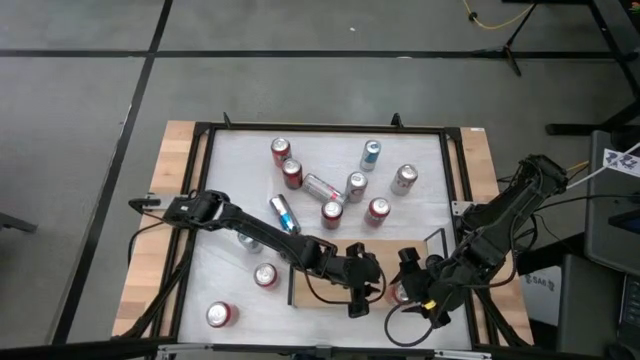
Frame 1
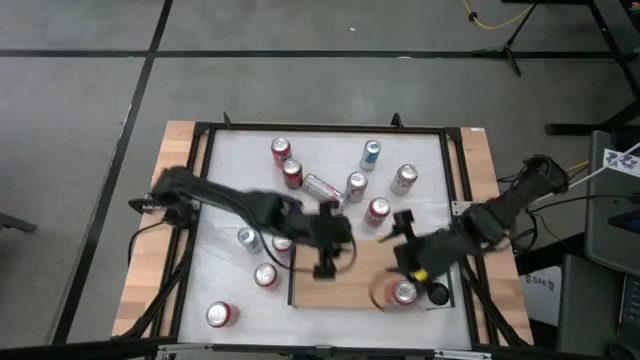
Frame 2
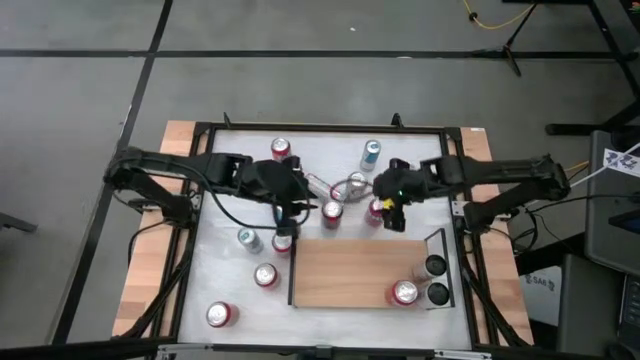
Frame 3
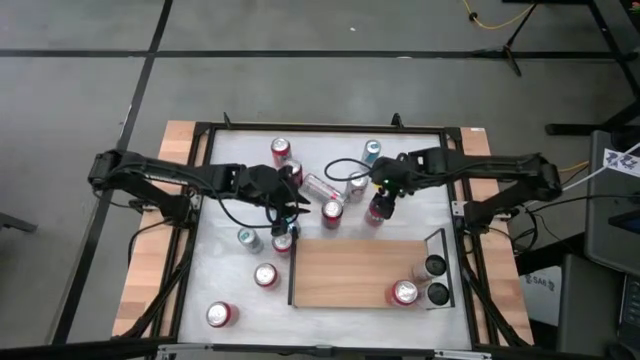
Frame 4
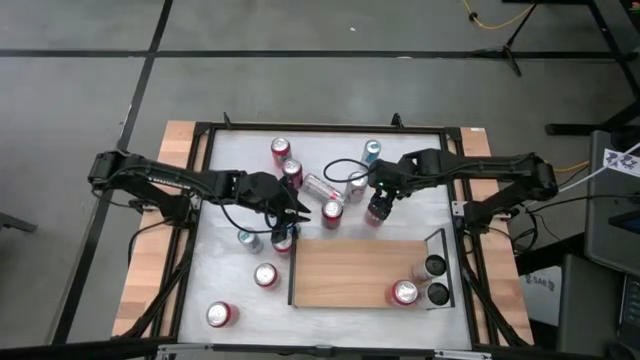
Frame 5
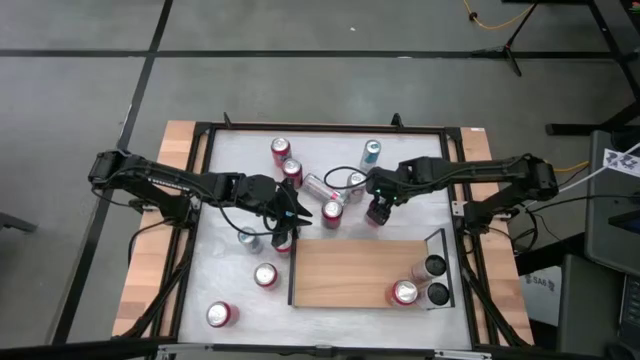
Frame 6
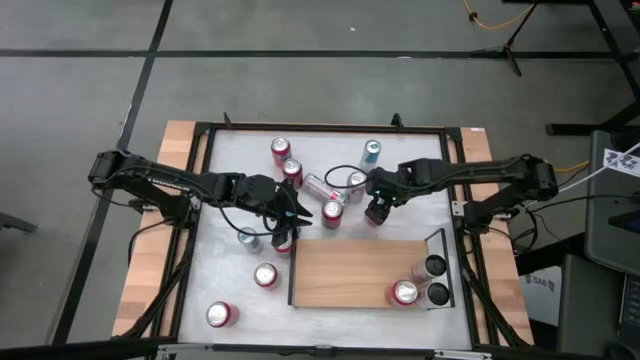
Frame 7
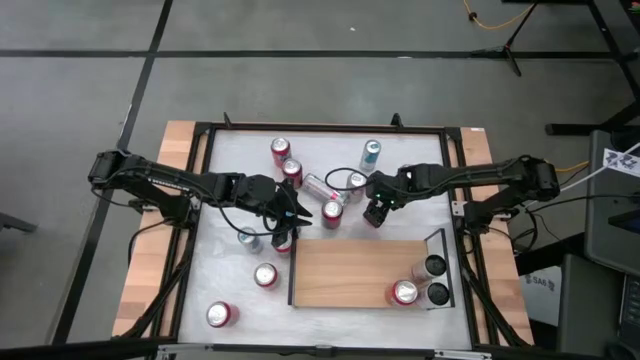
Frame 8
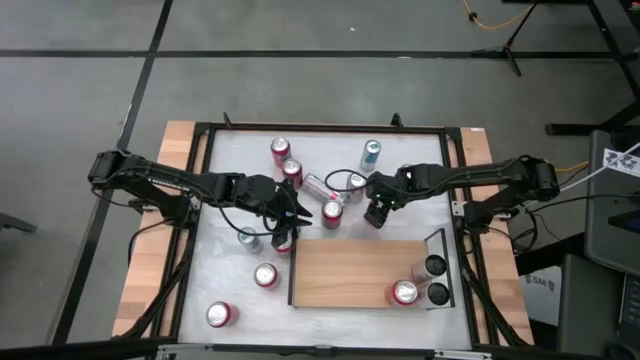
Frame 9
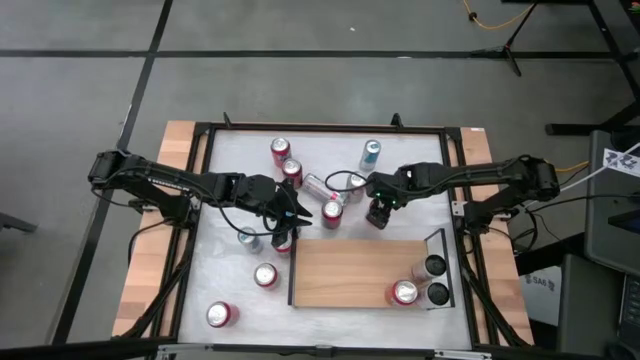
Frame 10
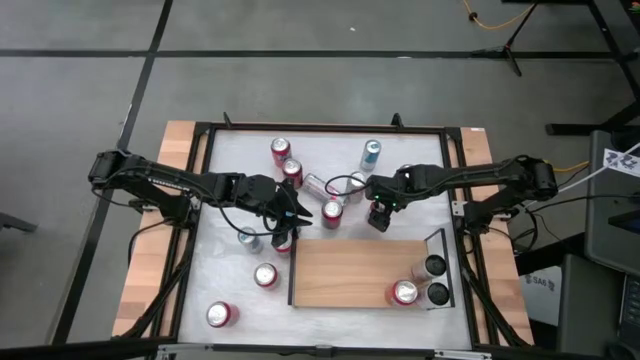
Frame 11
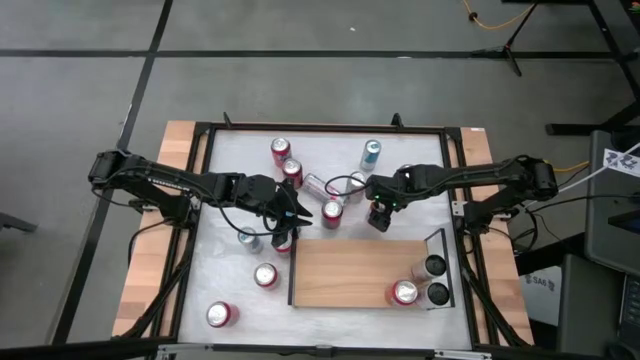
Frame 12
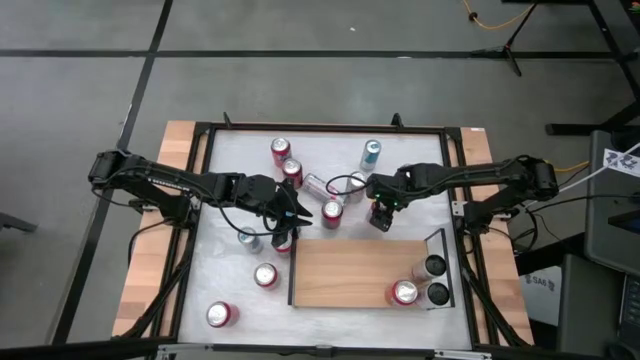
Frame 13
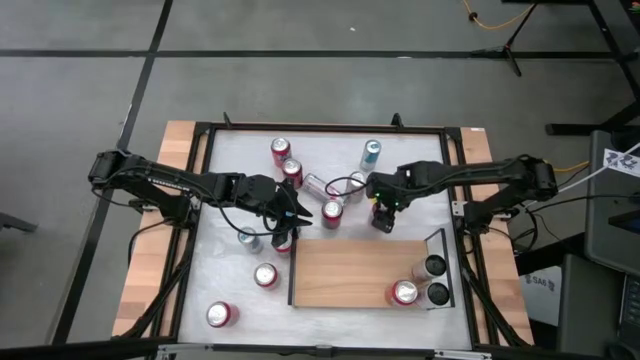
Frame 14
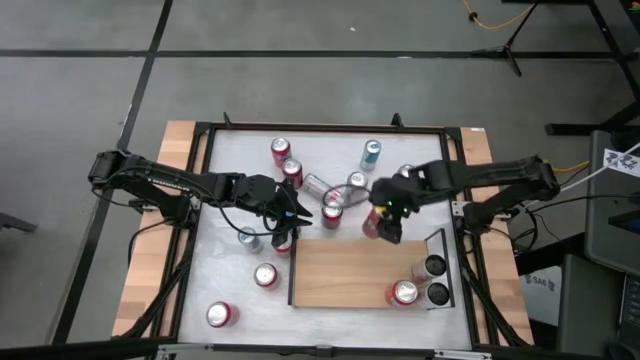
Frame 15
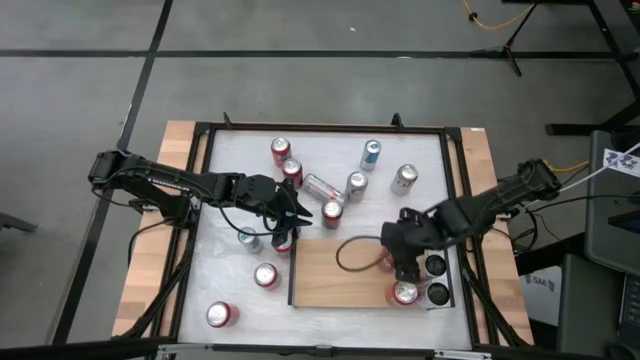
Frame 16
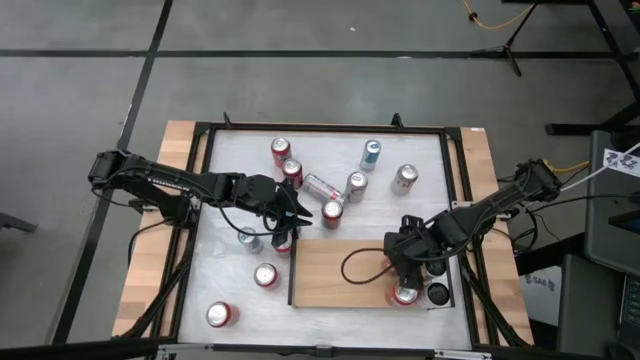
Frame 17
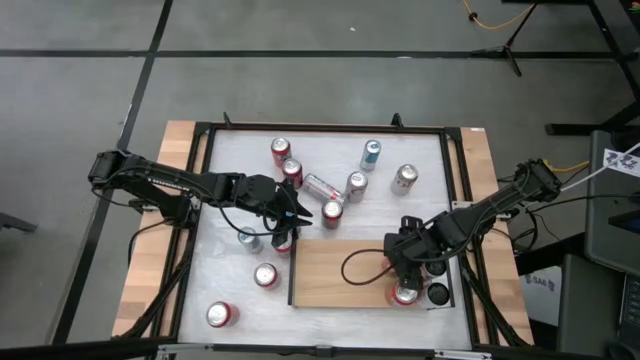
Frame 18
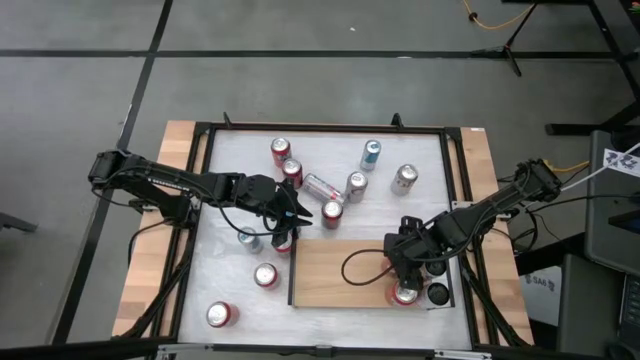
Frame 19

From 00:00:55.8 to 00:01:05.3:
Task: Place canned beverage on shelf
Put the center right orange soda can on the shelf

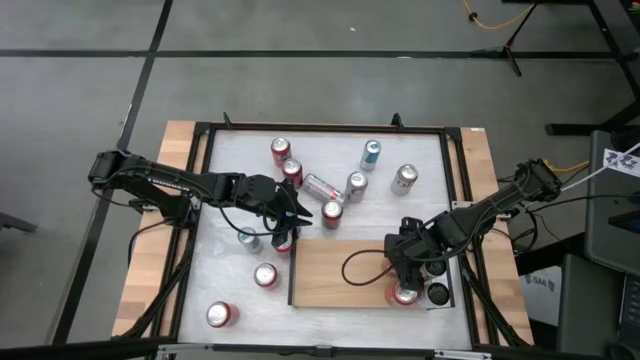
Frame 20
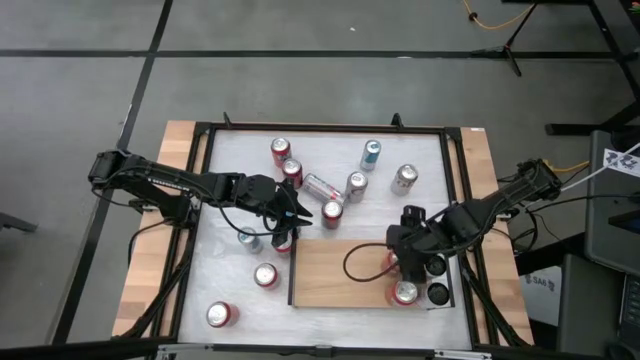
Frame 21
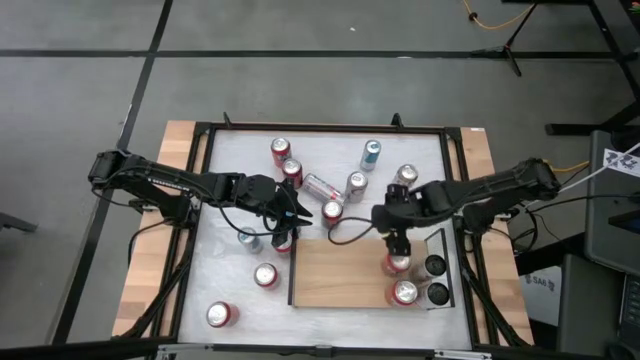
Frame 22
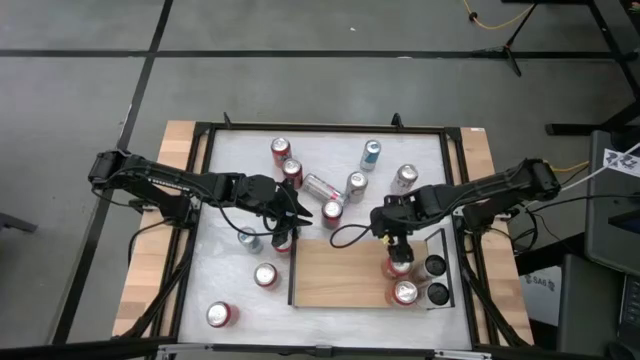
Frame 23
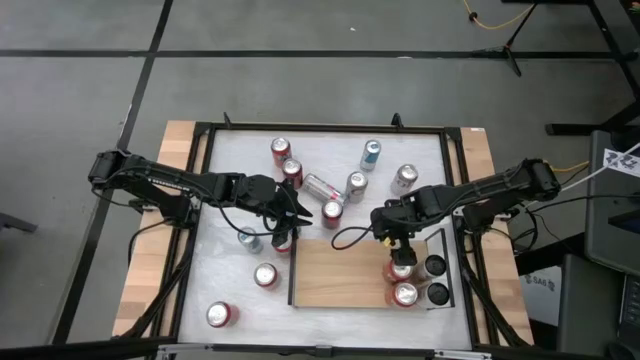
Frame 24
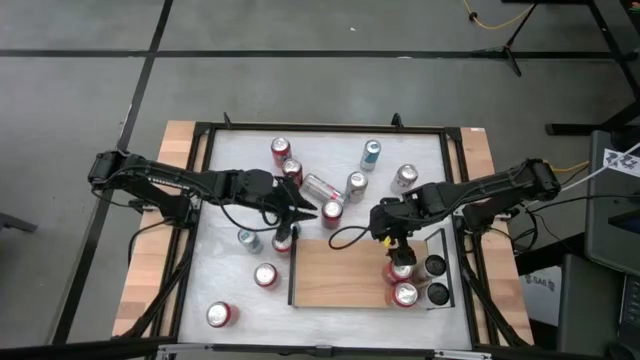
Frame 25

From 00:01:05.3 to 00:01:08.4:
Adjust the top orange soda can on the shelf

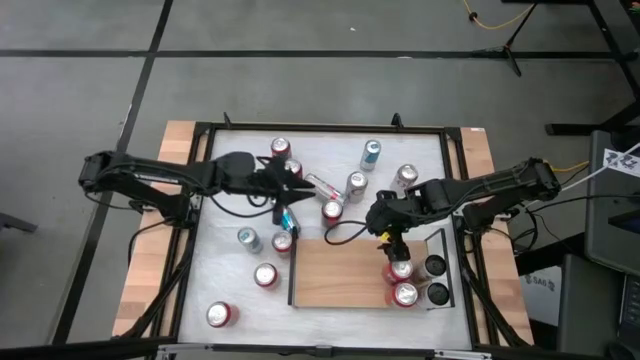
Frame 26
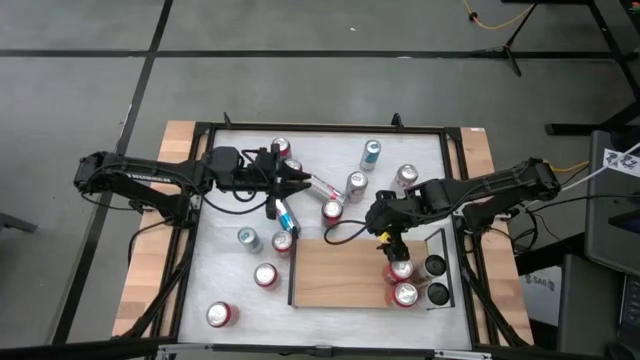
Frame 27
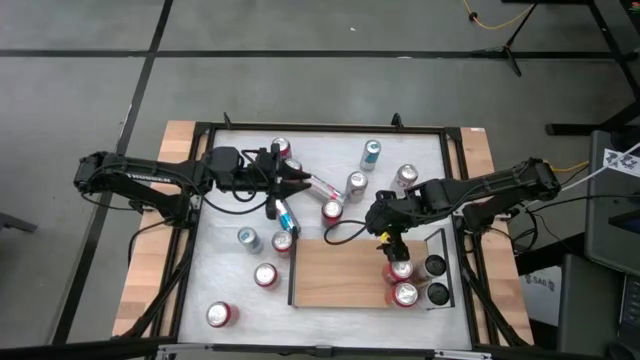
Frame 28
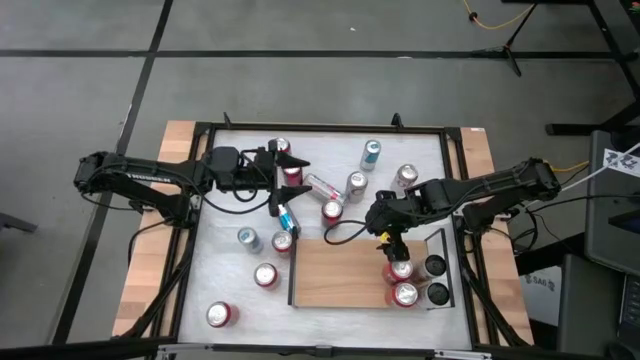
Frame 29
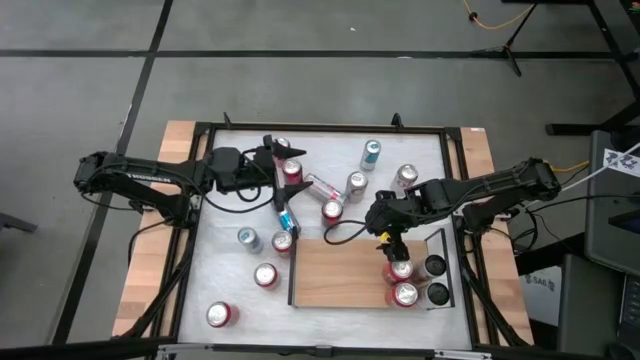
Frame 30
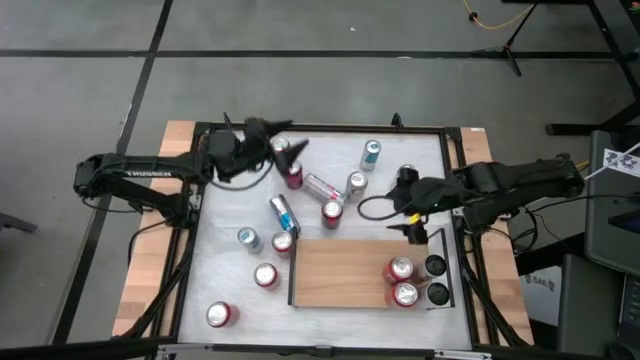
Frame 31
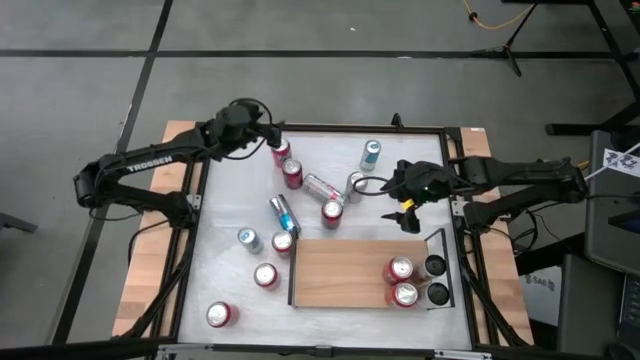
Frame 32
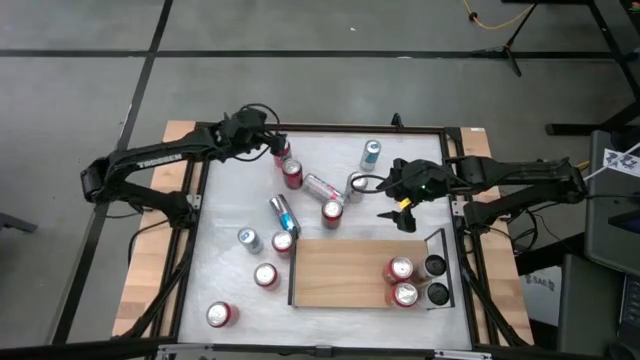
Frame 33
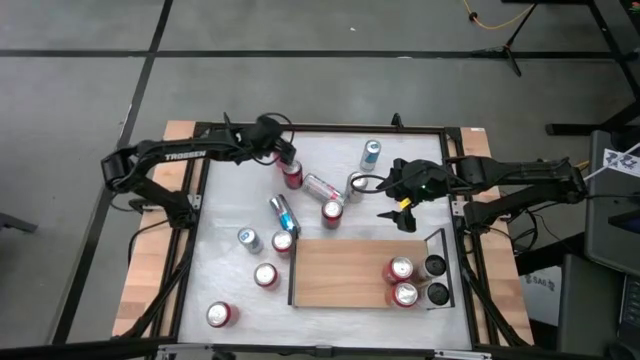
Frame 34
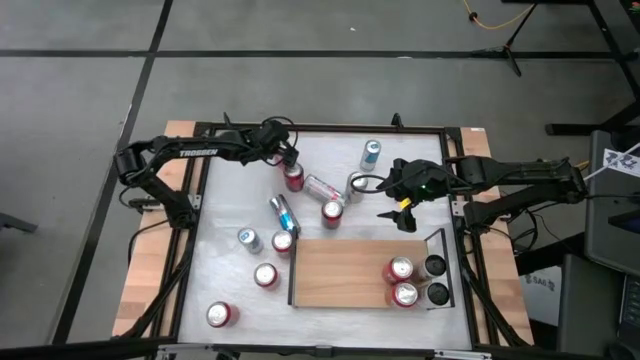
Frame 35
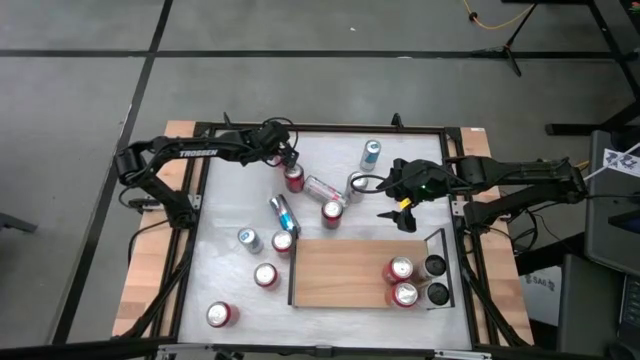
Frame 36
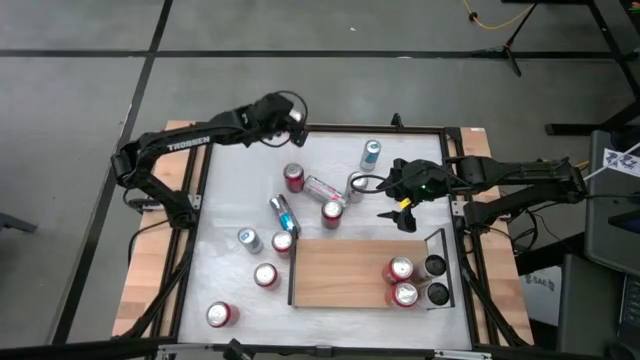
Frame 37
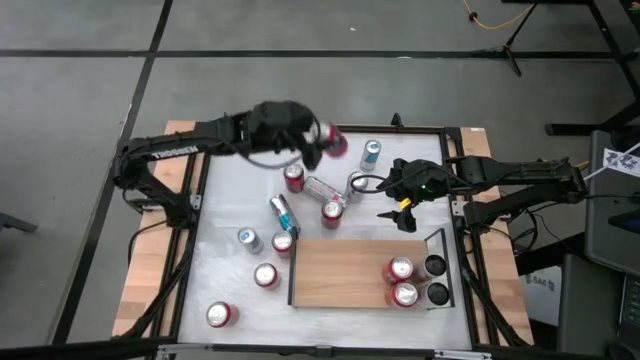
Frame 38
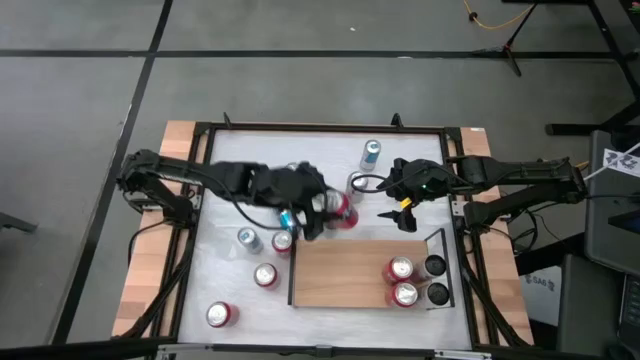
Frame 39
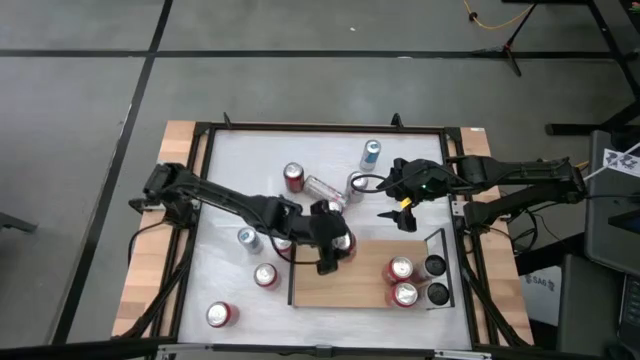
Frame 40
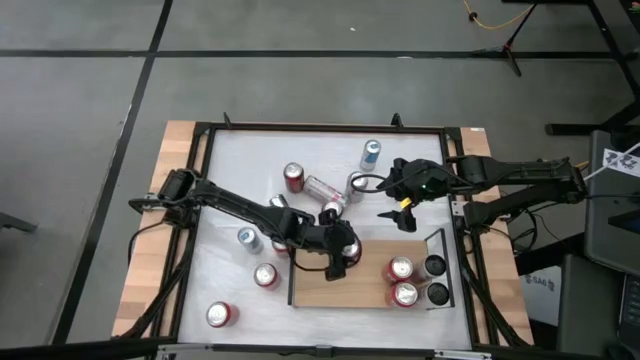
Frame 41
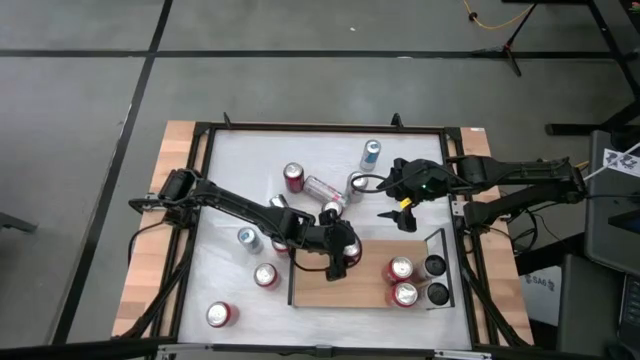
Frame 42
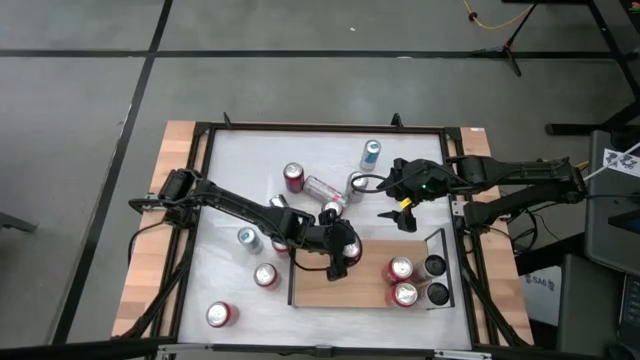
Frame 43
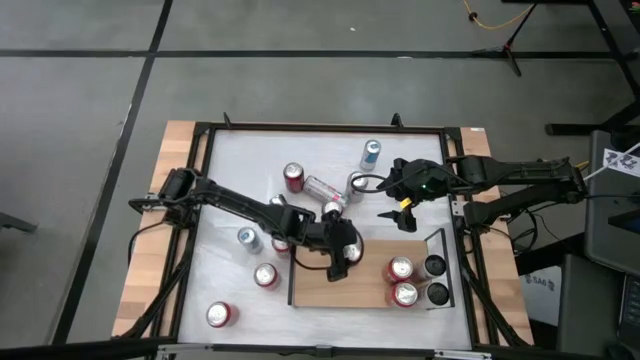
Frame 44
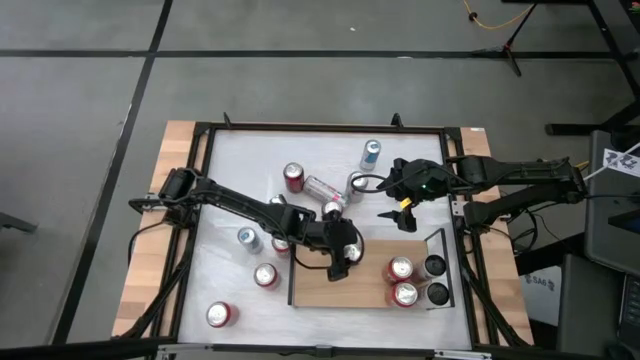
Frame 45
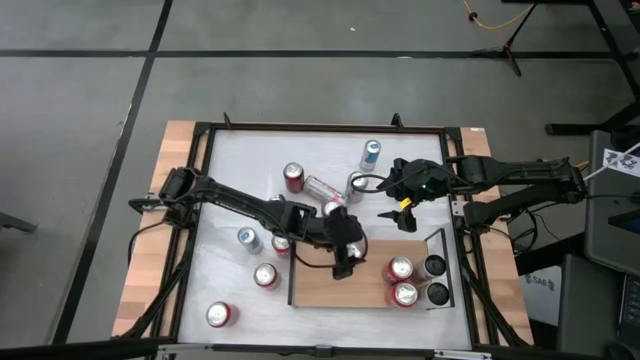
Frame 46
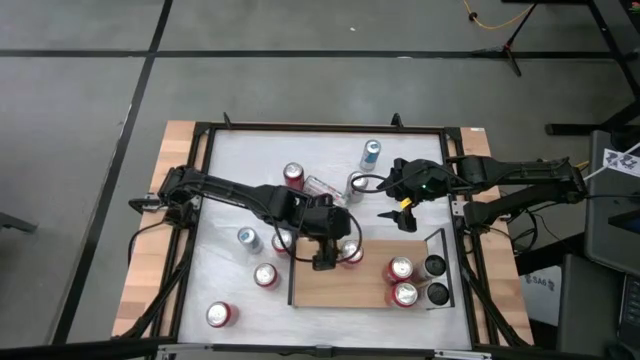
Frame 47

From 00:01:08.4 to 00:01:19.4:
Put the top left orange soda can on the shelf
